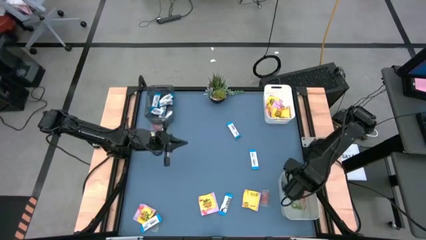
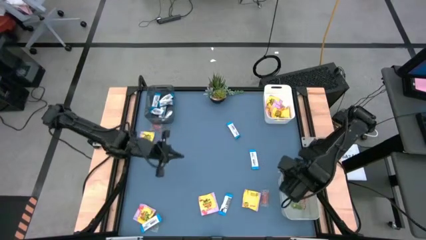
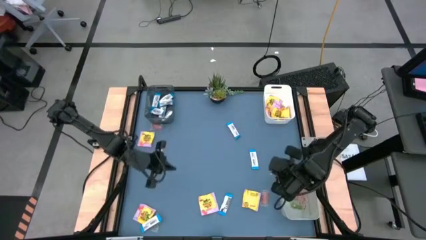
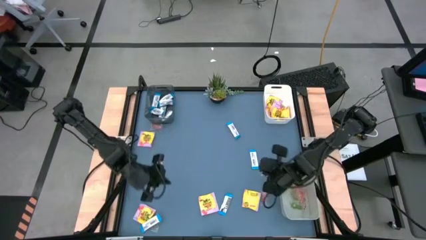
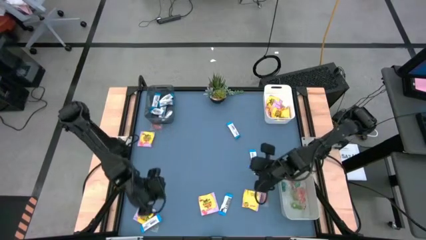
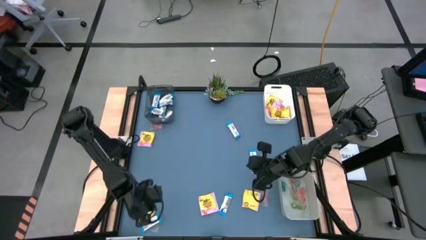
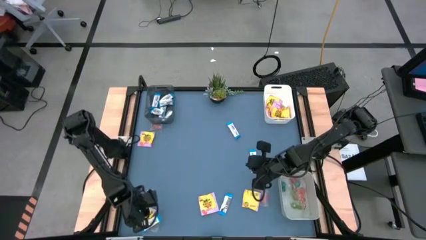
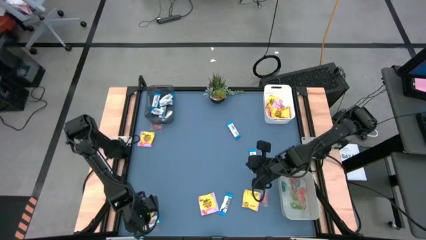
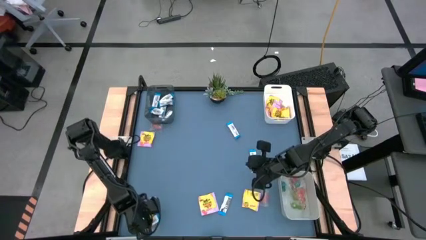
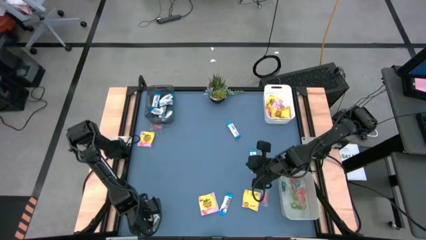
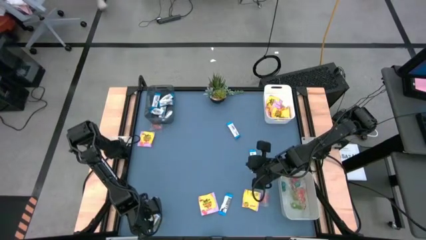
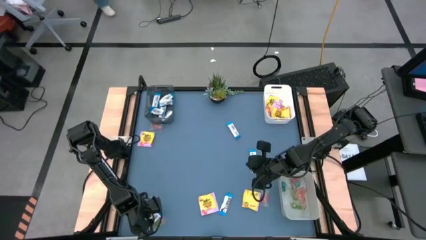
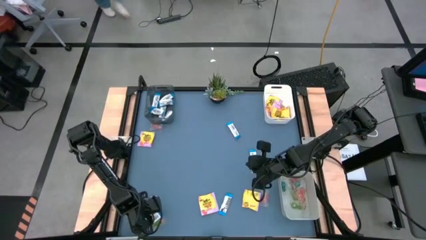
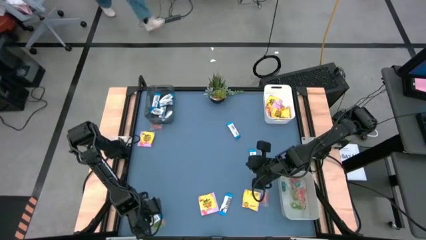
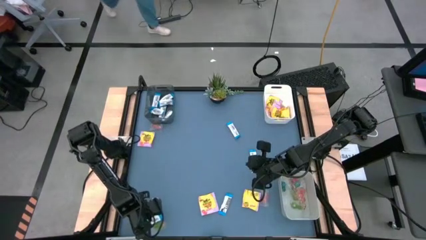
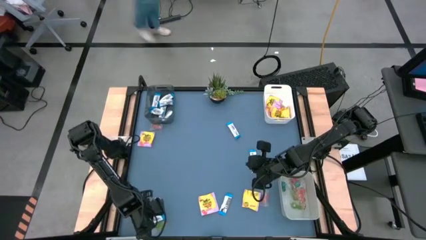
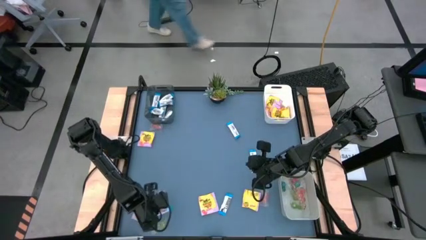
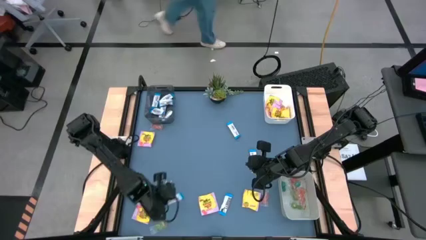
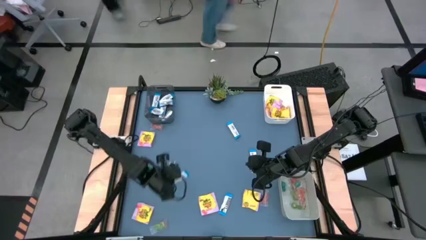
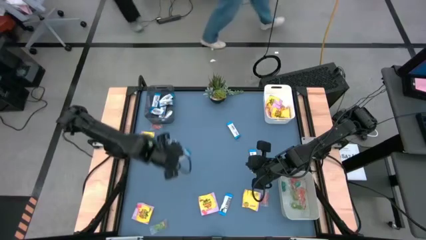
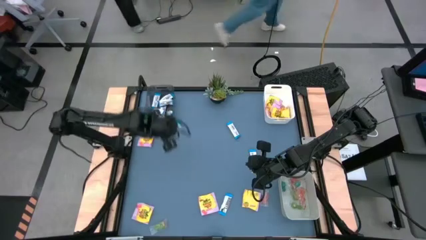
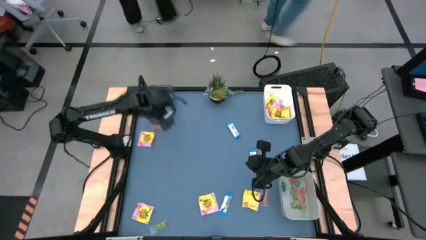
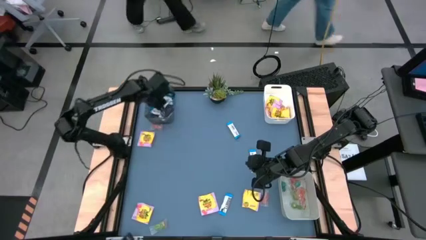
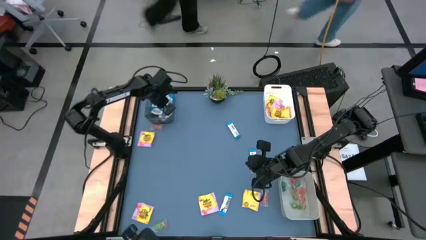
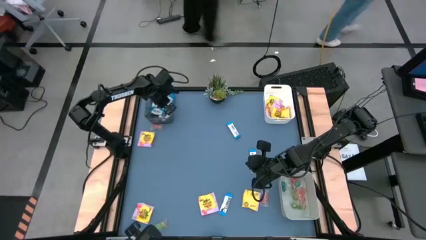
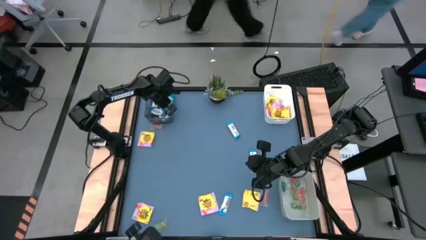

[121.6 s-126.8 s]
Task: Sort candy
Put the bottom left white chocolate bar into the transparent black bin

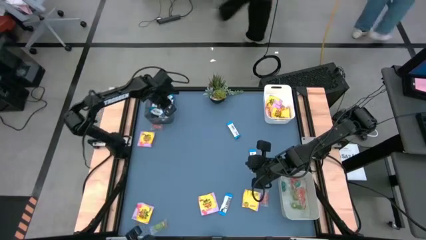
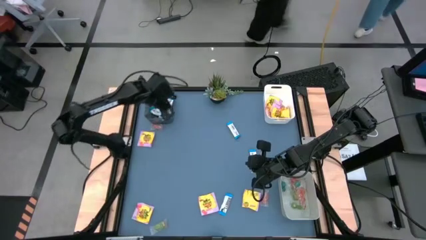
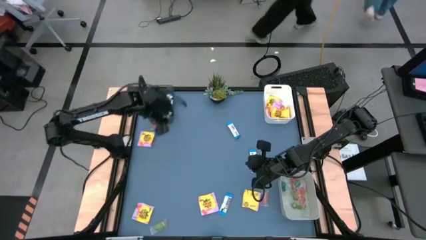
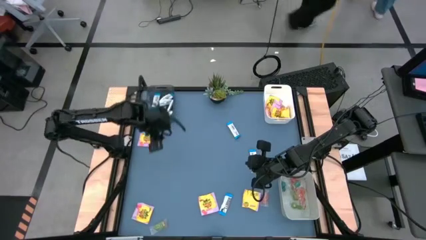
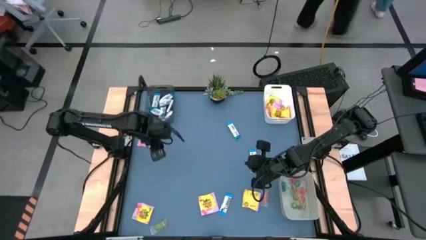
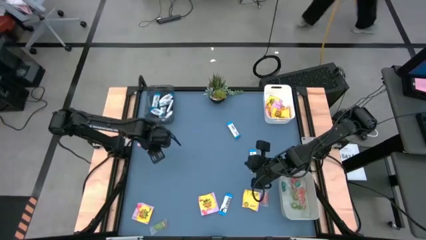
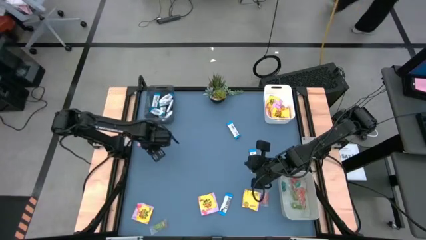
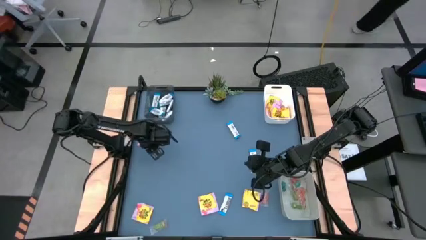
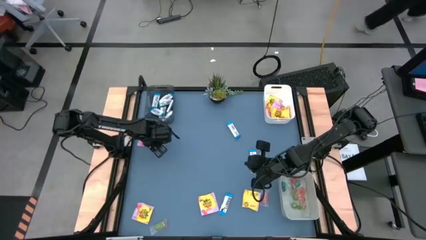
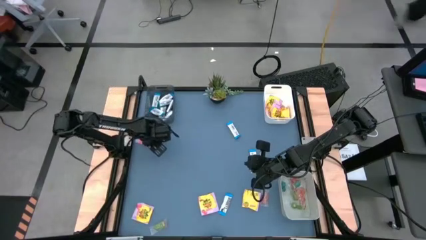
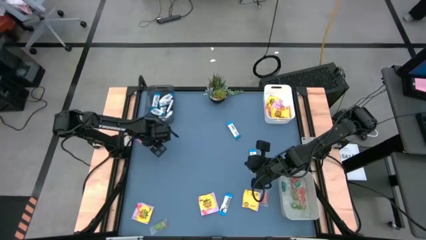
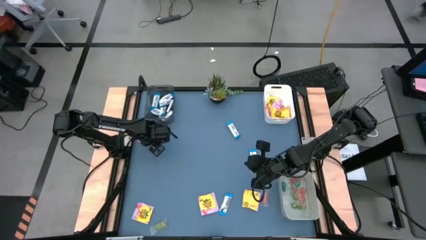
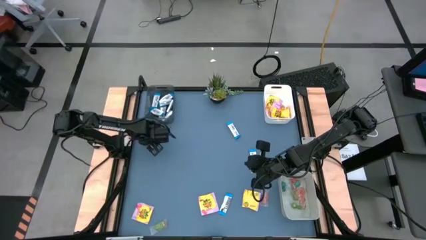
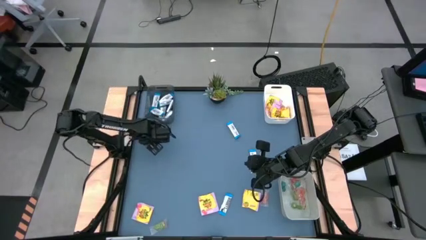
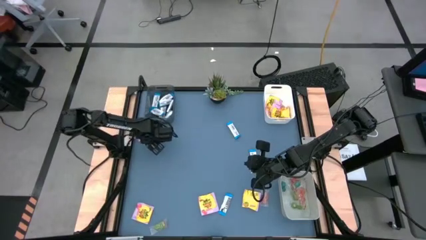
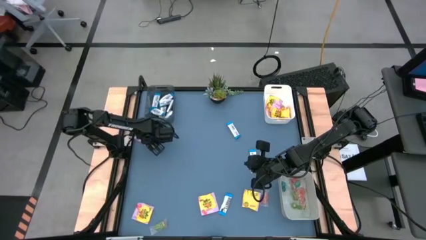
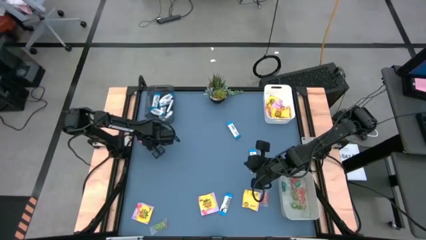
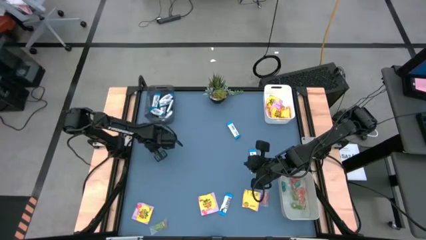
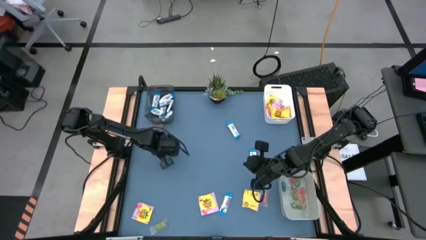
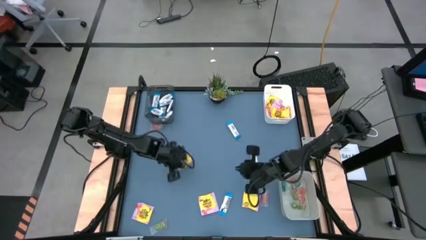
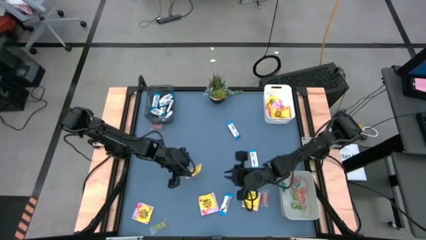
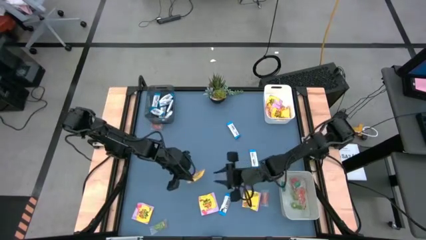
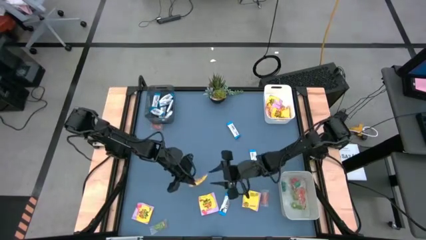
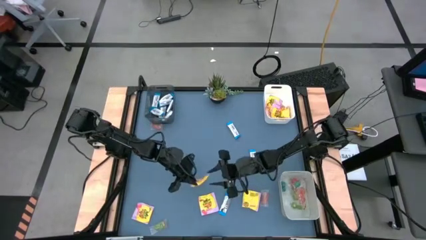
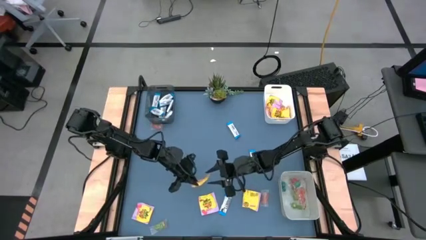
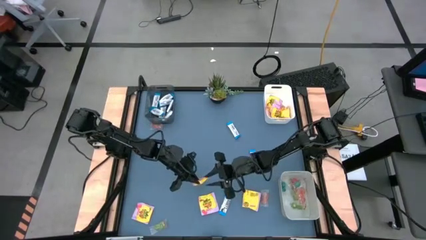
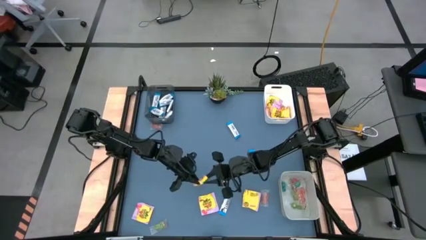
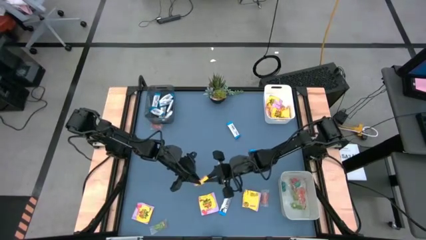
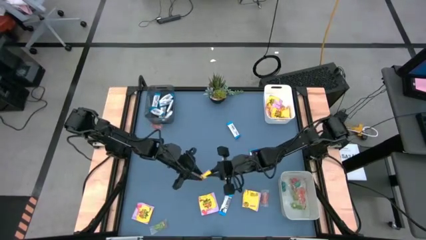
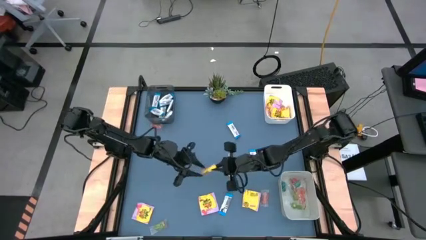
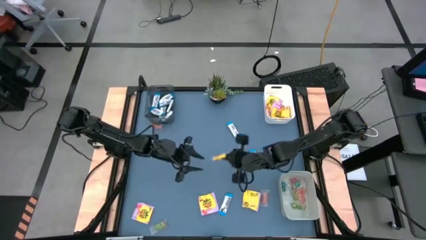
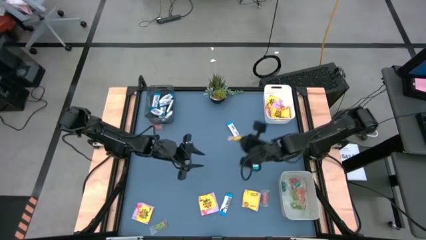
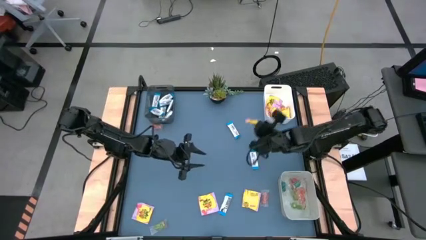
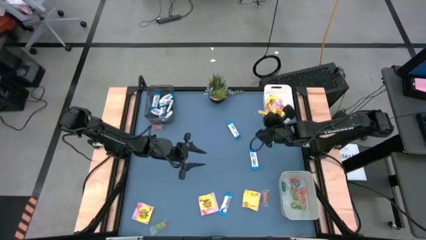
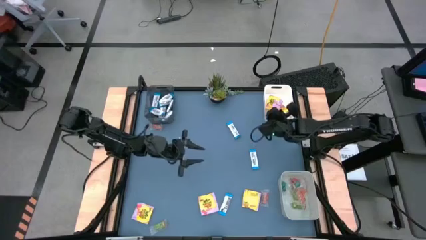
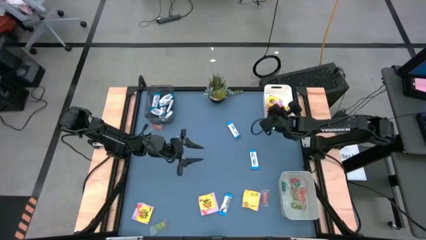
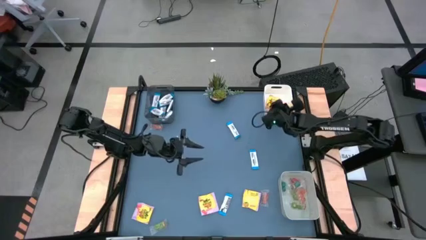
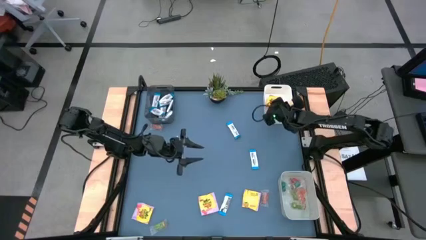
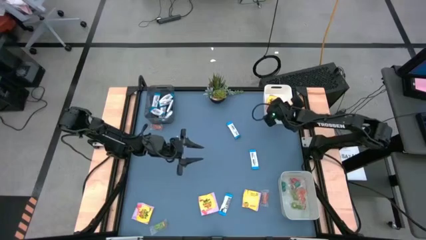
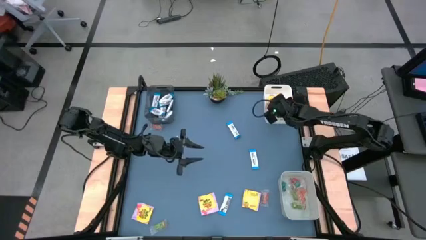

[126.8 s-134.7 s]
Put the top yellow candy pack into the white bin

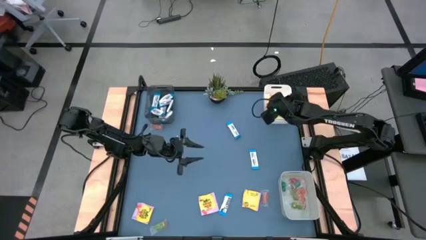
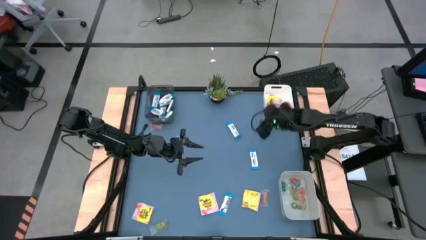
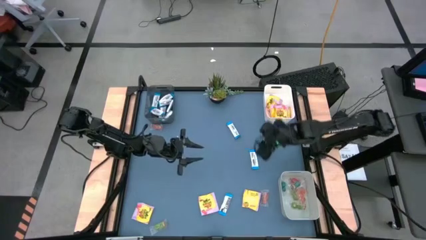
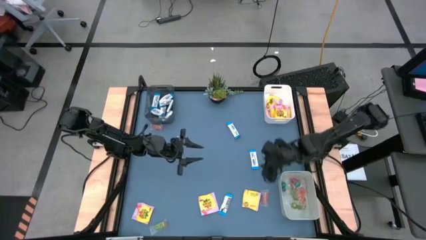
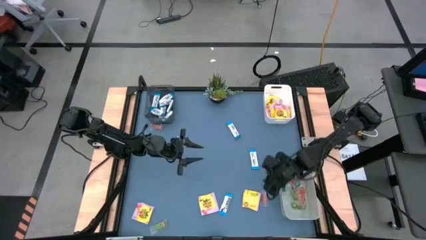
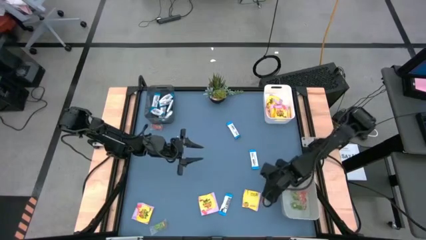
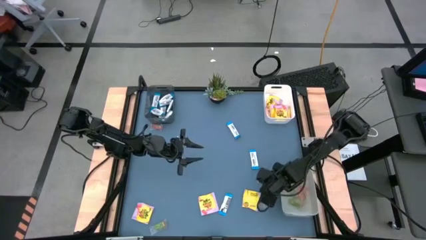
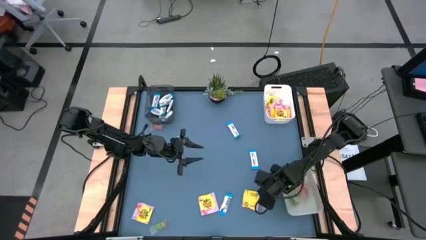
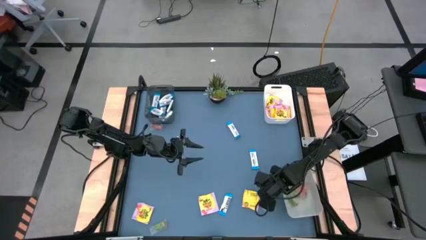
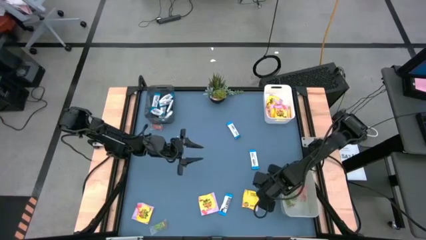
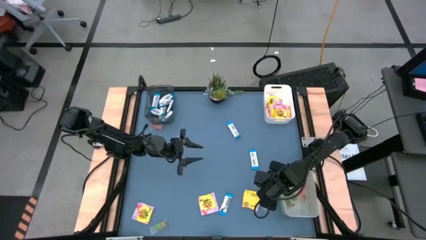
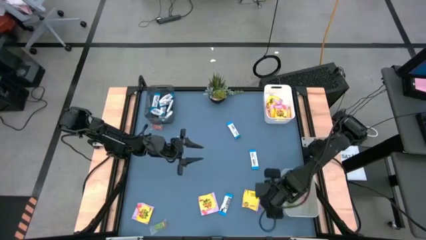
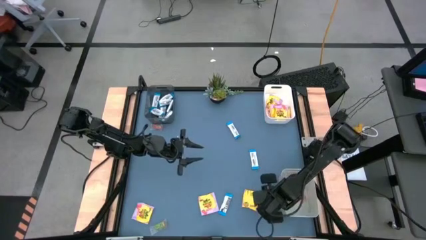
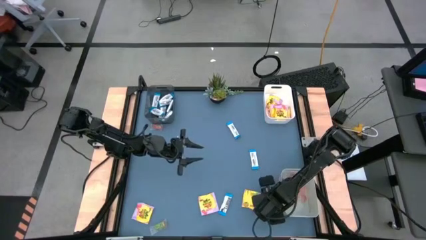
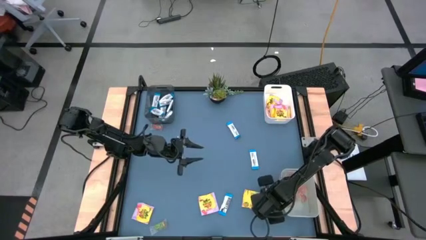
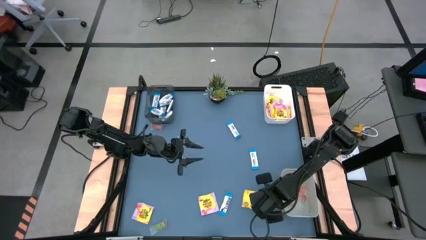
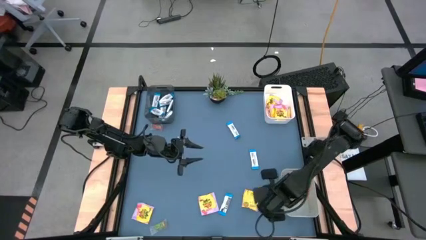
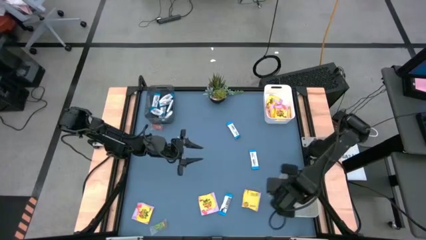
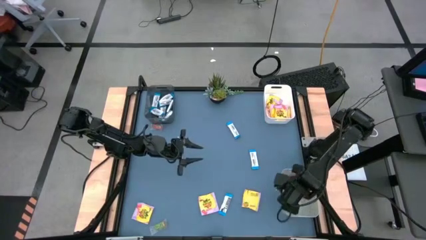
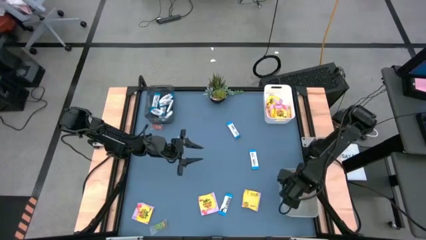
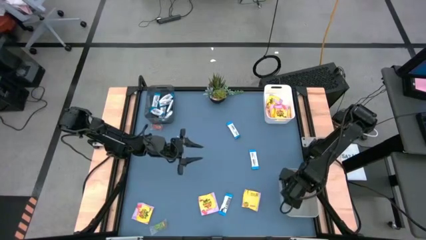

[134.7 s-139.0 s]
Put the bottom orange gummy candy into the grey bin

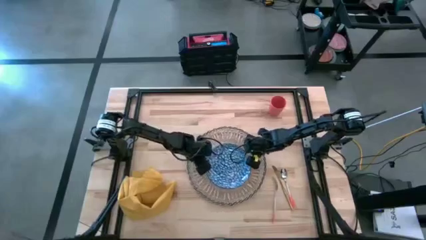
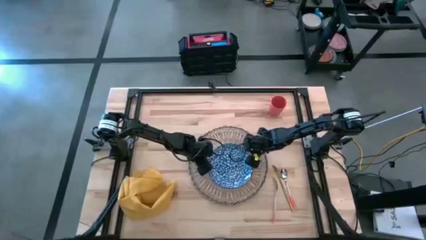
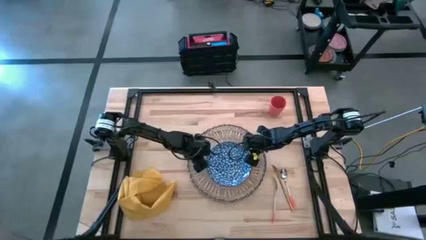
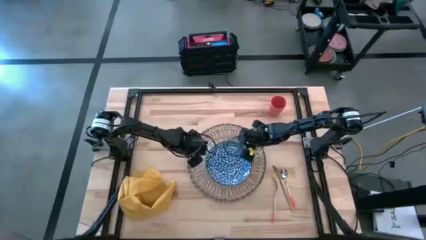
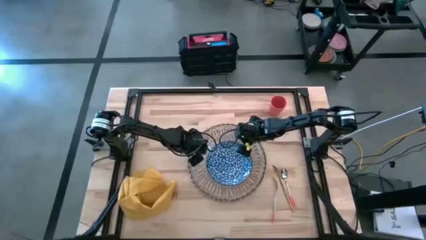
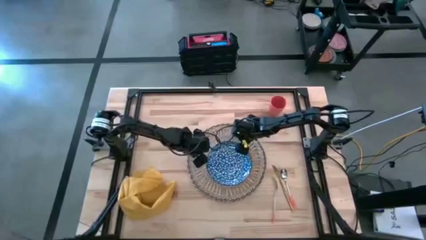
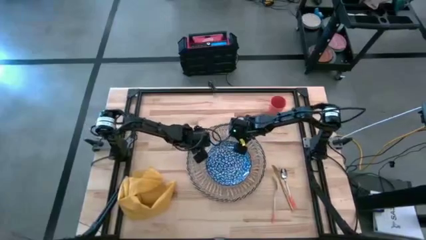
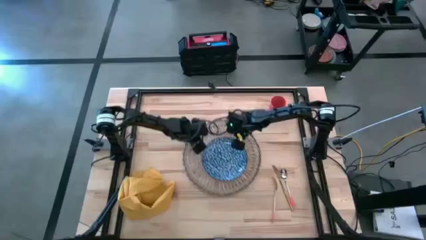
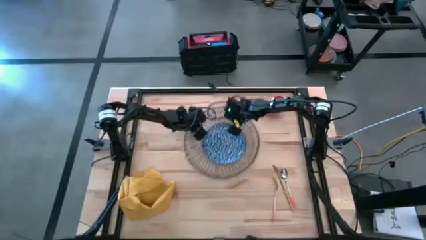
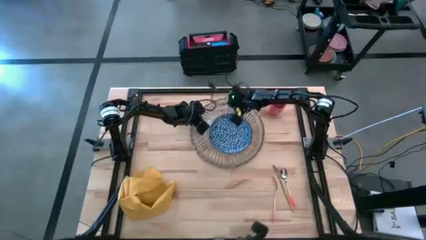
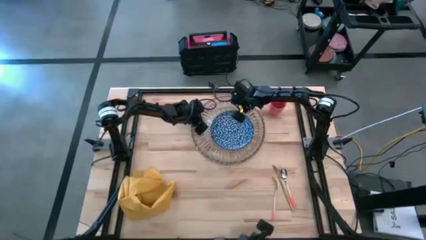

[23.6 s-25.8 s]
Task: Set table place
Move the brown placemat to the top center of the table
